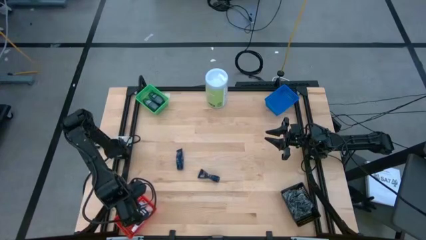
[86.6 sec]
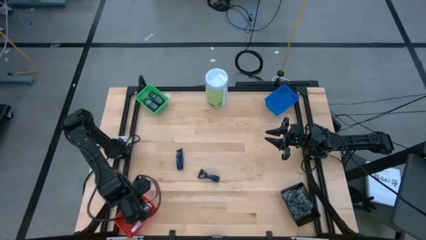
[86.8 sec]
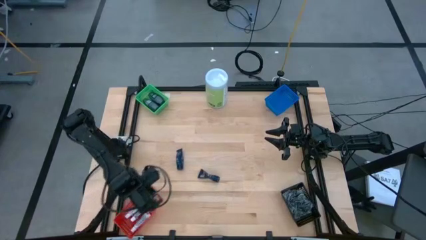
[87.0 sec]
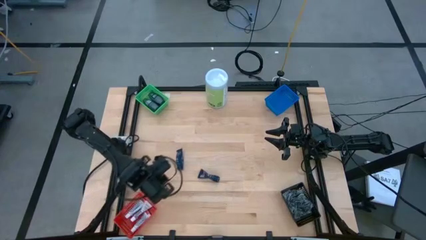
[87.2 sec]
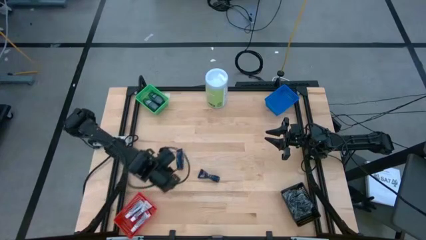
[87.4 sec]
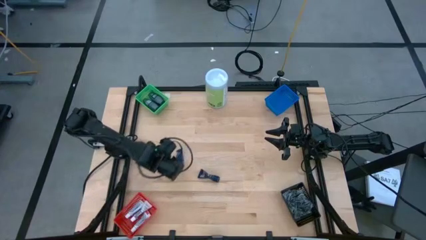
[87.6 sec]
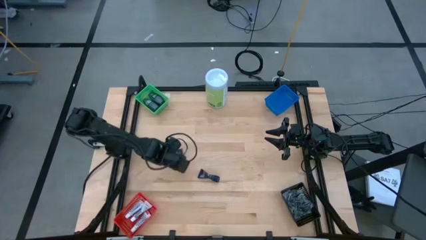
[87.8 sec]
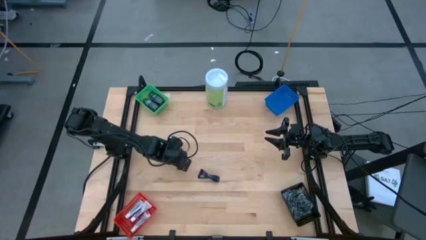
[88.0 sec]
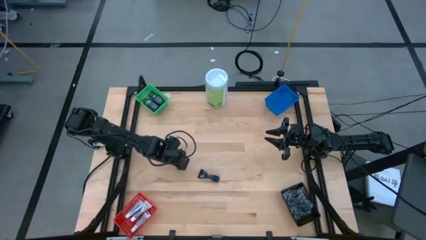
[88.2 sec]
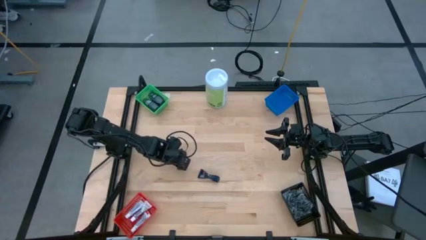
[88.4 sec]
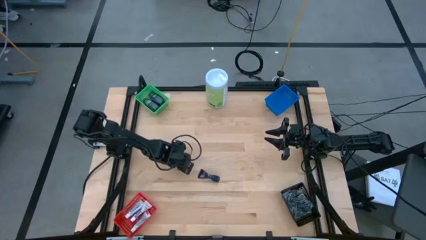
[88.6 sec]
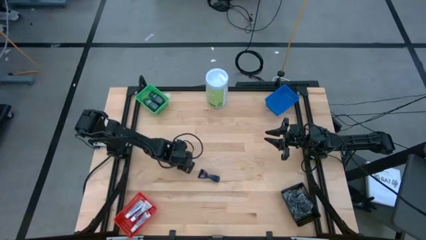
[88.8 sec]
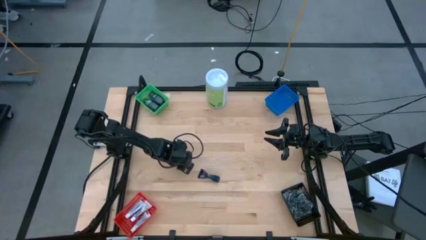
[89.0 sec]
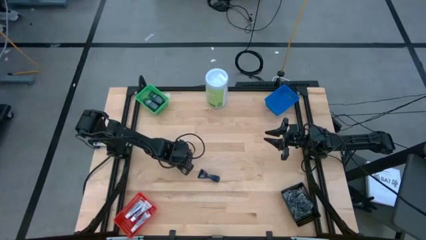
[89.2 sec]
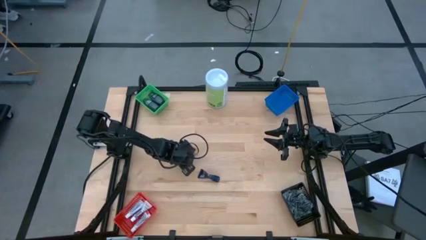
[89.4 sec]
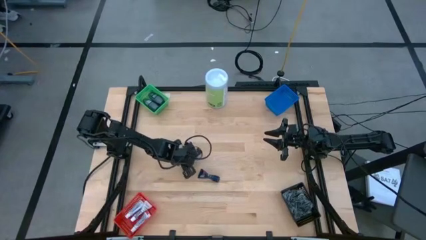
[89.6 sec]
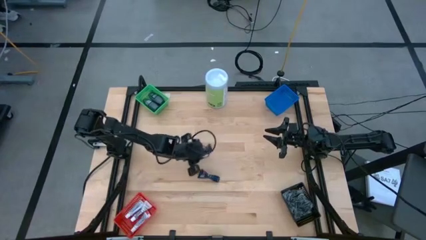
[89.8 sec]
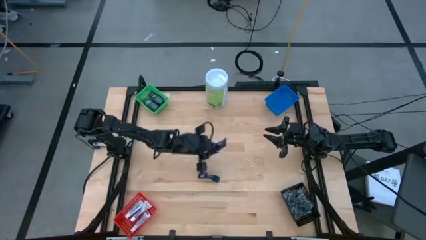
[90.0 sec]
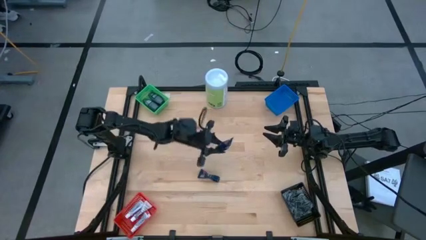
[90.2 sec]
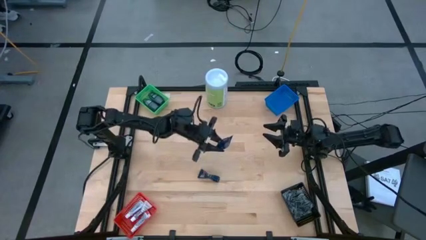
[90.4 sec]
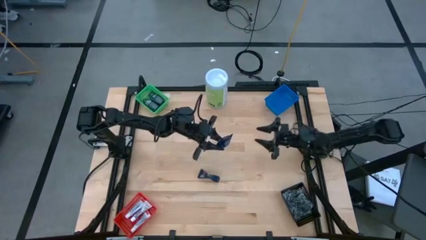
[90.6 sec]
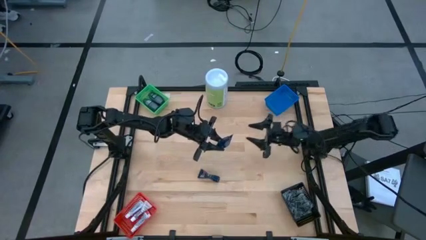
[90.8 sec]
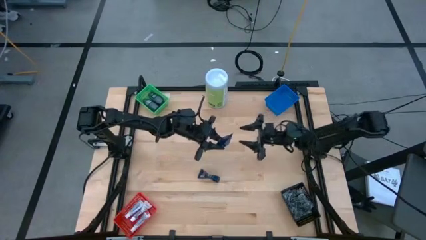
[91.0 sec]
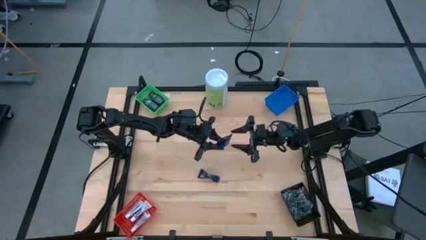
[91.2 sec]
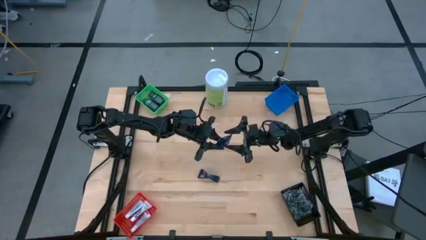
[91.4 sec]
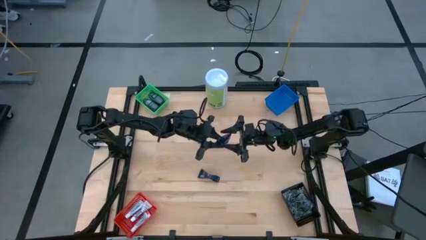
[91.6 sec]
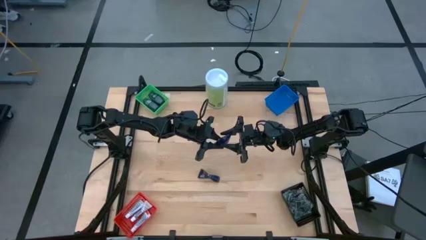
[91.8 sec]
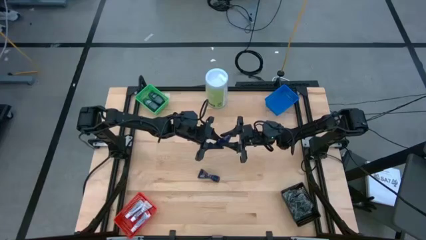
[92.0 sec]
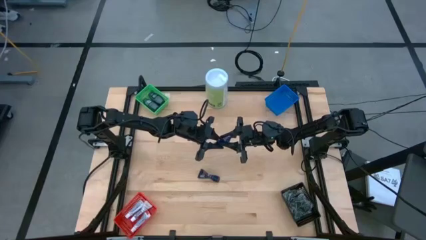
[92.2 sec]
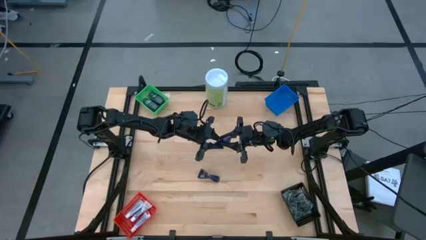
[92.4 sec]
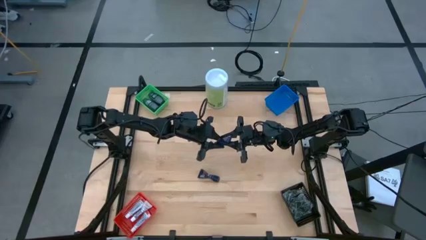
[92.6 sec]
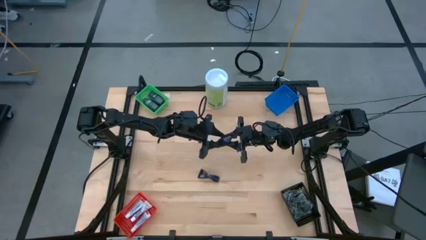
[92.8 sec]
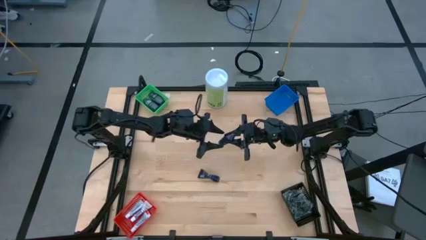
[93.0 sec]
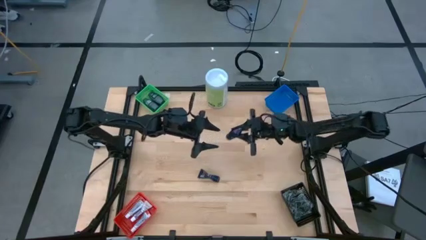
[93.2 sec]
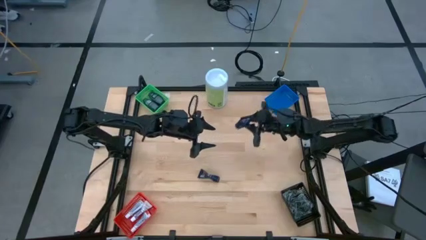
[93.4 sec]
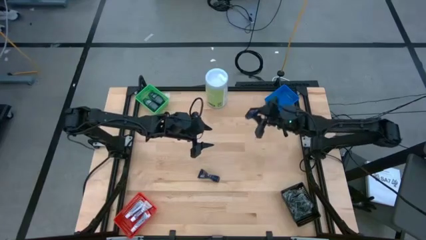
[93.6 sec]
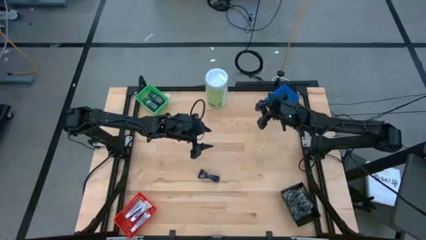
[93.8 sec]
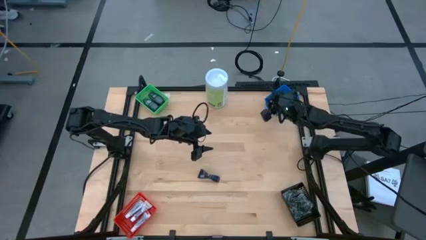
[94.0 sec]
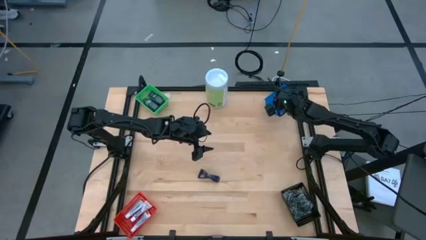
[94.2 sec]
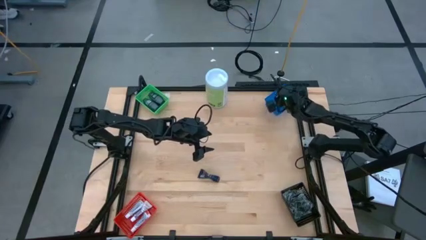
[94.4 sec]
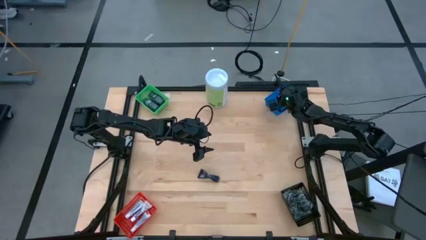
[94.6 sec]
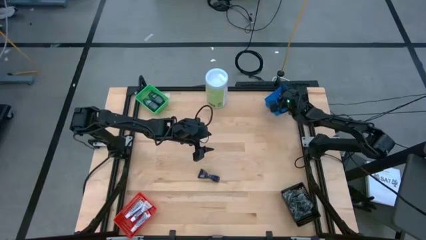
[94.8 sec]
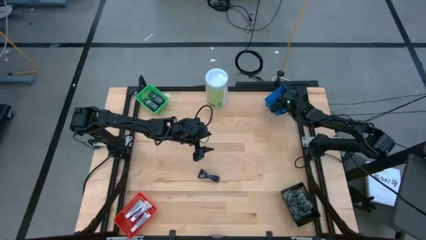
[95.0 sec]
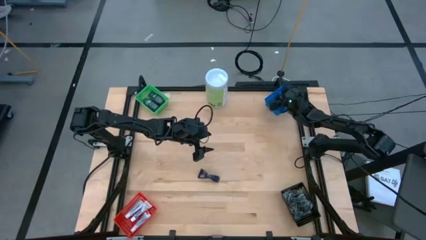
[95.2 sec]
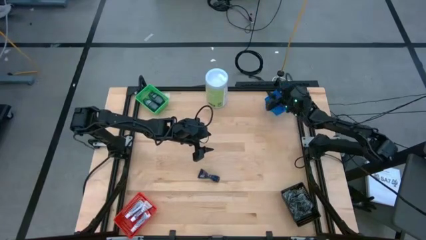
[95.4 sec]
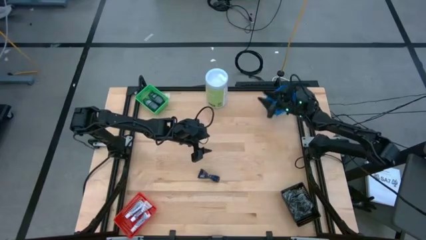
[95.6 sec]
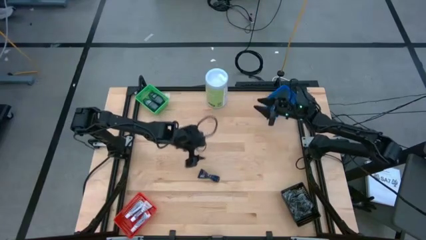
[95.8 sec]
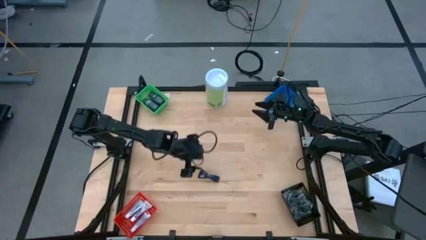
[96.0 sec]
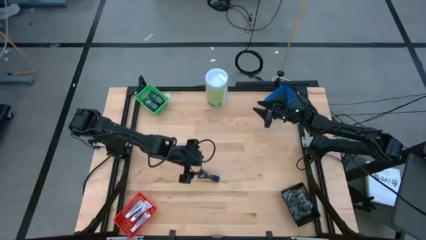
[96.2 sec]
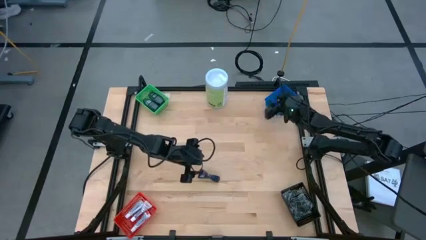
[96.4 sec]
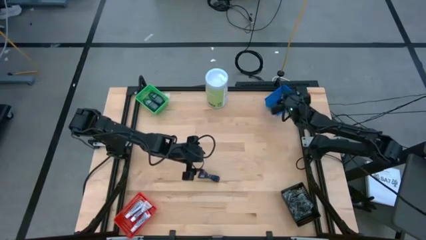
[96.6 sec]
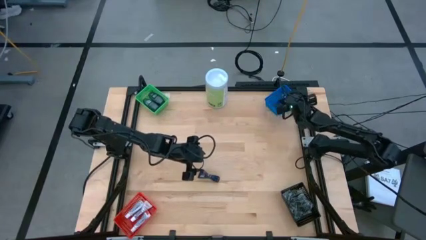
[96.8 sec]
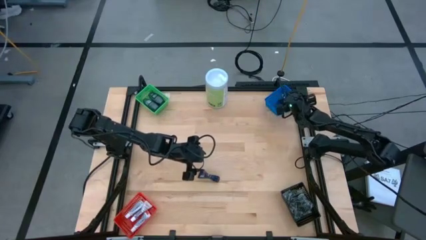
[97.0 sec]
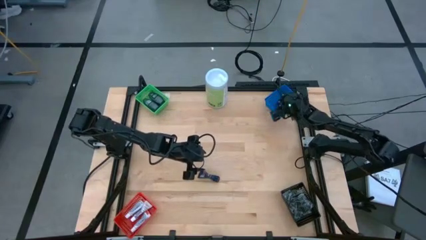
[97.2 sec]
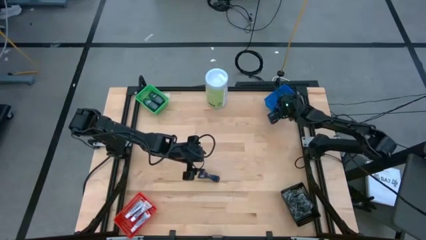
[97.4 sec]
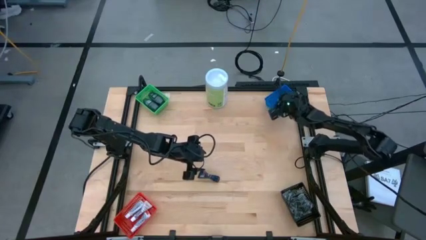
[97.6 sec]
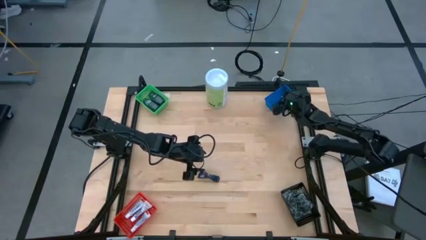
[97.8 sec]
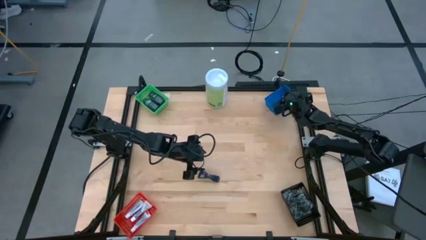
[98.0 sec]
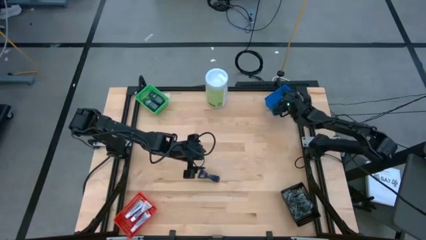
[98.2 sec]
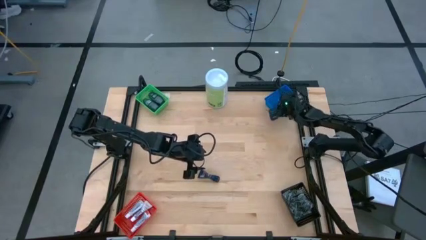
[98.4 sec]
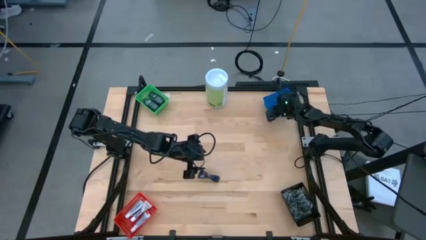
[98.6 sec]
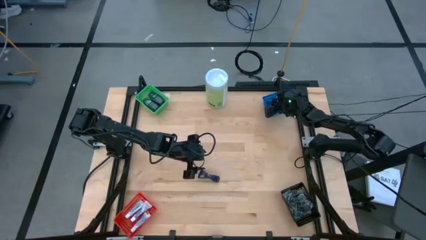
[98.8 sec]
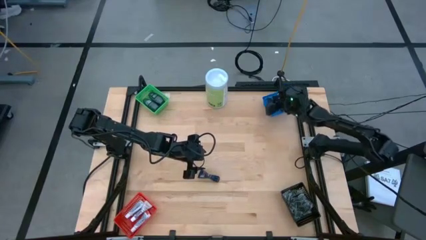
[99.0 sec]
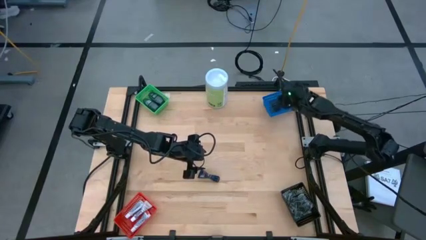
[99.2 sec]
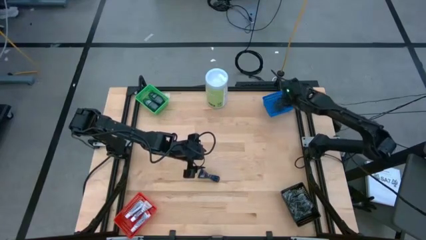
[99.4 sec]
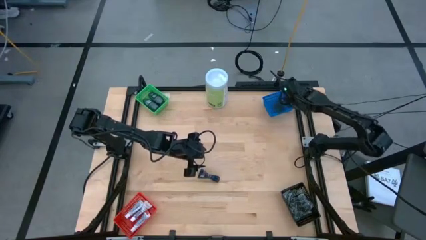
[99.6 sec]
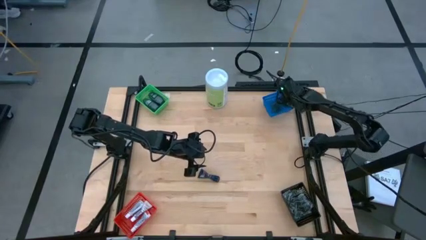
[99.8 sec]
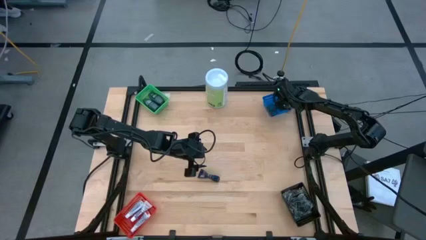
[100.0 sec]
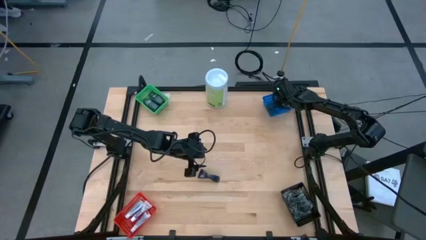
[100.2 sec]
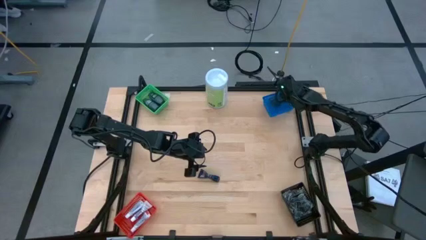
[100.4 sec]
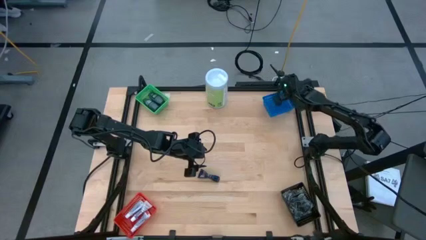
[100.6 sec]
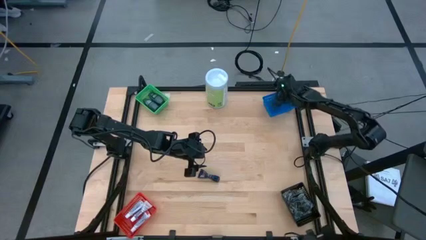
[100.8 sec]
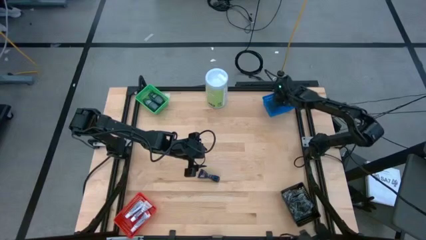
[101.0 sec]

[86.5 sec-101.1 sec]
Task: Pick & Place Travel size toiletries
Put the left blue shave cream into the blue bin
